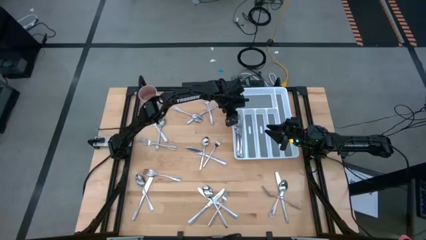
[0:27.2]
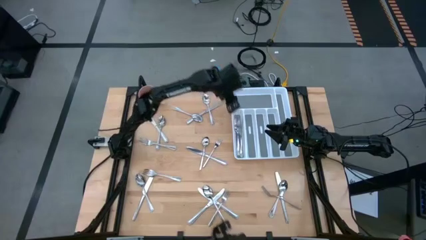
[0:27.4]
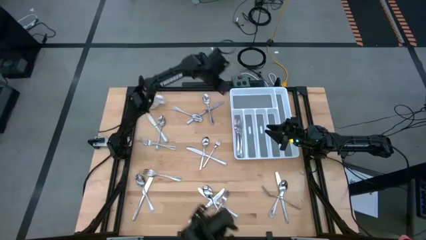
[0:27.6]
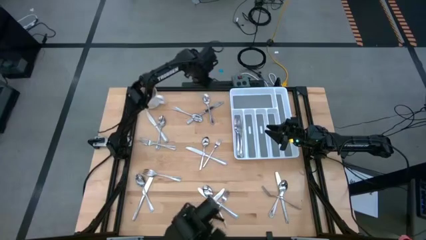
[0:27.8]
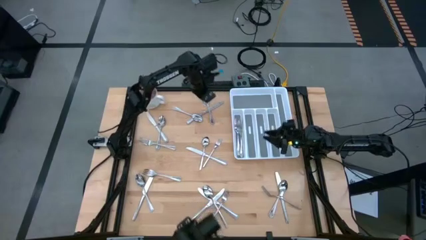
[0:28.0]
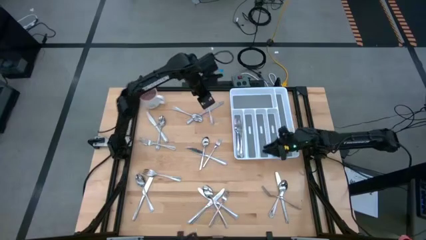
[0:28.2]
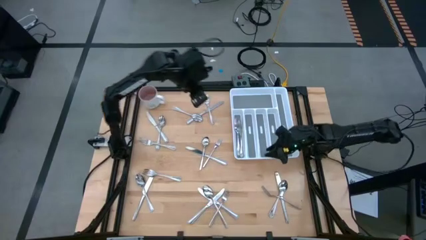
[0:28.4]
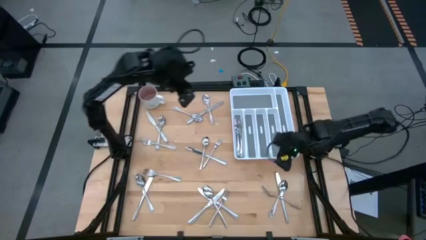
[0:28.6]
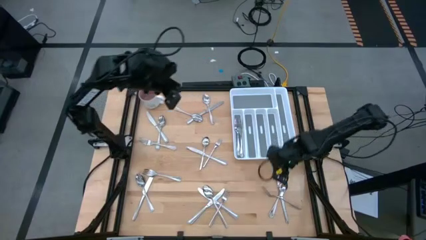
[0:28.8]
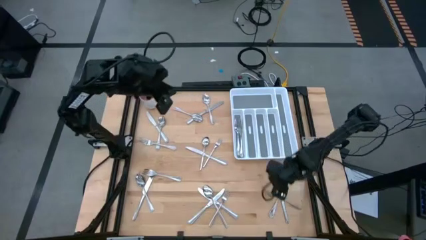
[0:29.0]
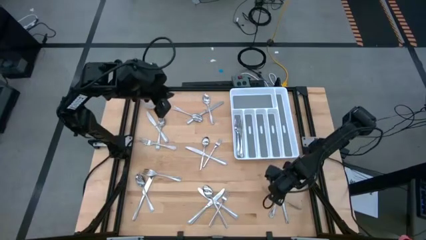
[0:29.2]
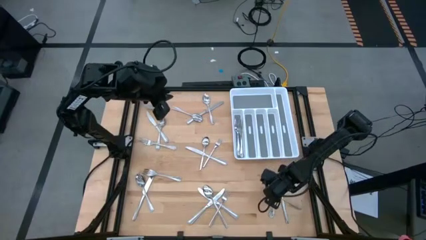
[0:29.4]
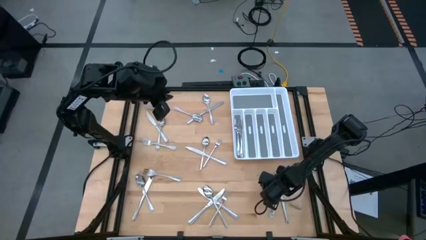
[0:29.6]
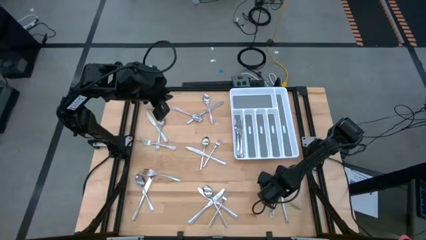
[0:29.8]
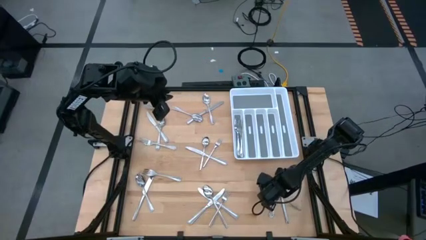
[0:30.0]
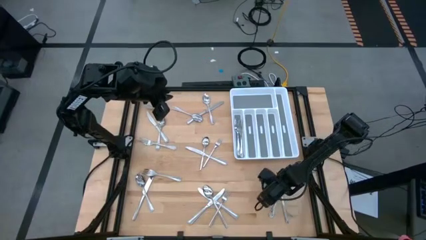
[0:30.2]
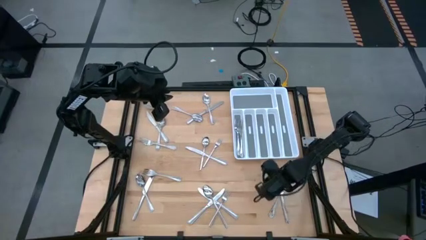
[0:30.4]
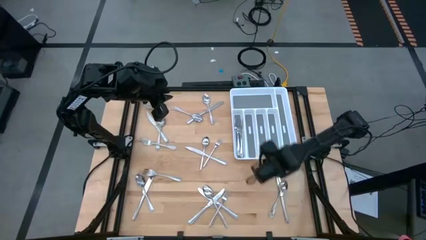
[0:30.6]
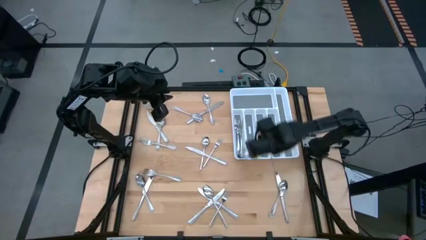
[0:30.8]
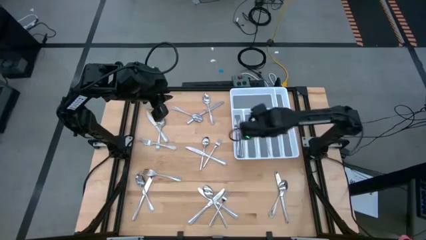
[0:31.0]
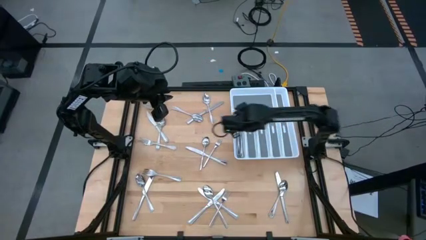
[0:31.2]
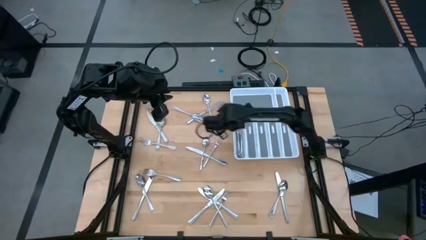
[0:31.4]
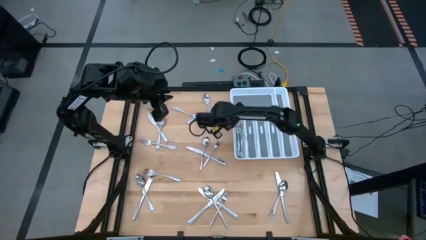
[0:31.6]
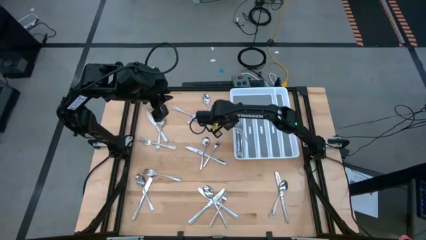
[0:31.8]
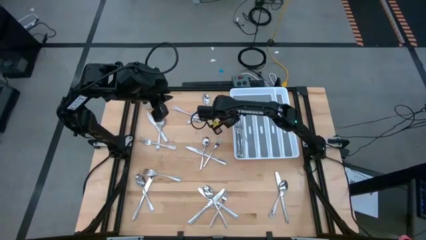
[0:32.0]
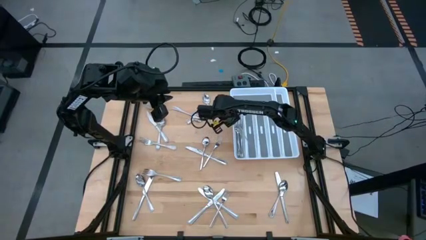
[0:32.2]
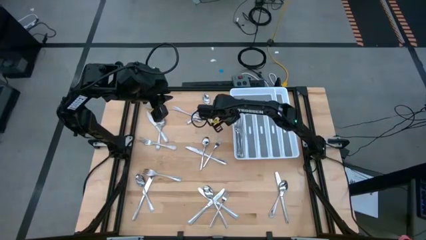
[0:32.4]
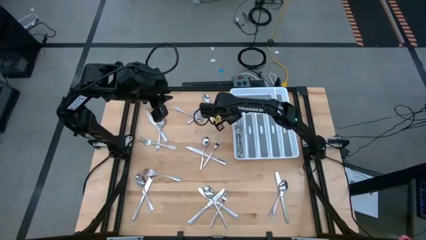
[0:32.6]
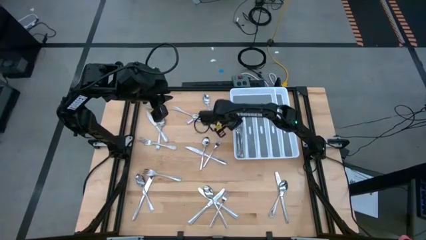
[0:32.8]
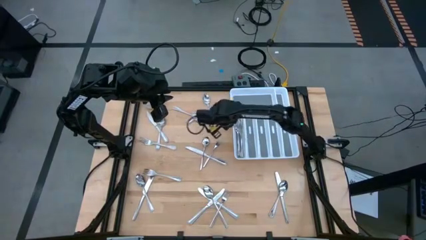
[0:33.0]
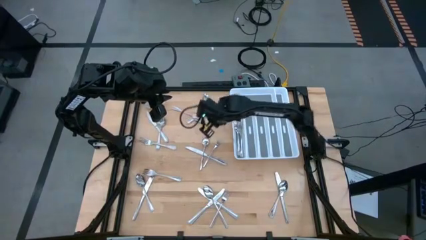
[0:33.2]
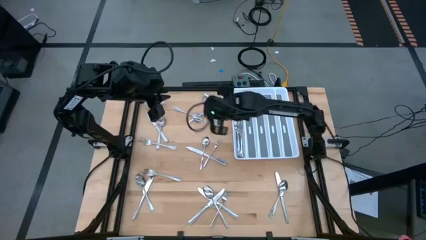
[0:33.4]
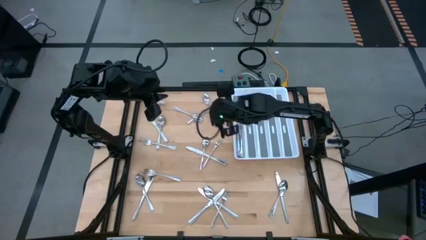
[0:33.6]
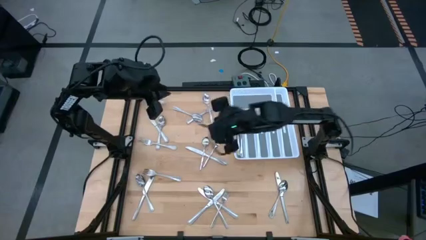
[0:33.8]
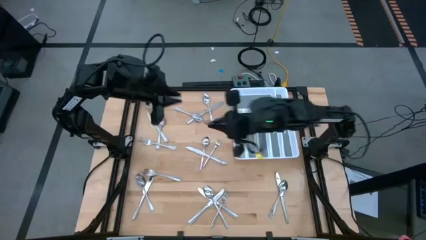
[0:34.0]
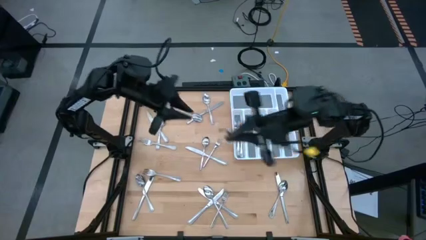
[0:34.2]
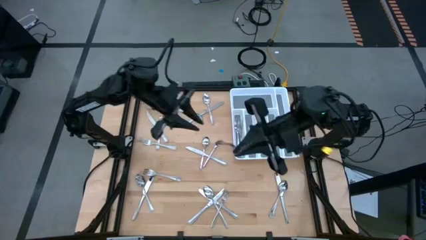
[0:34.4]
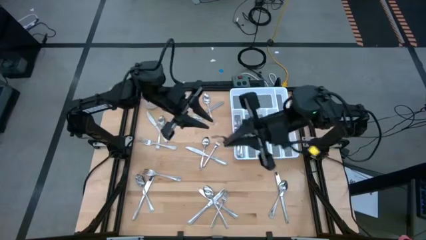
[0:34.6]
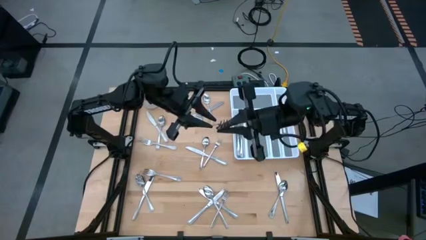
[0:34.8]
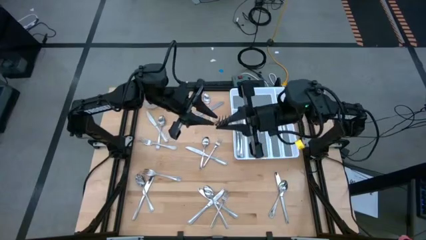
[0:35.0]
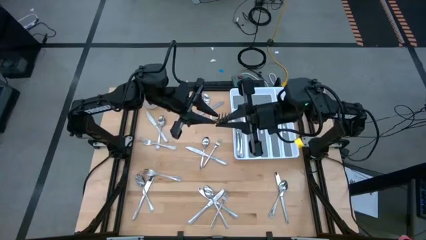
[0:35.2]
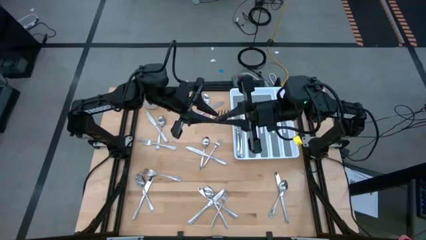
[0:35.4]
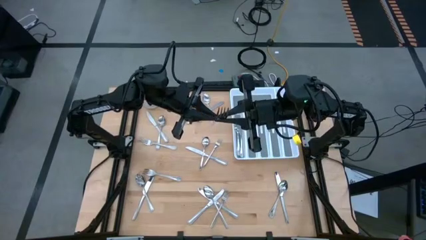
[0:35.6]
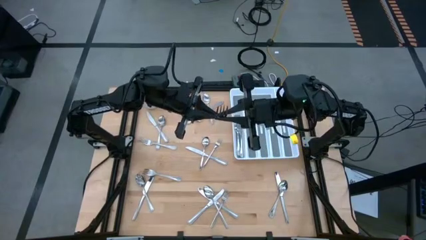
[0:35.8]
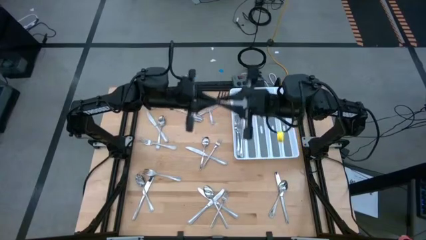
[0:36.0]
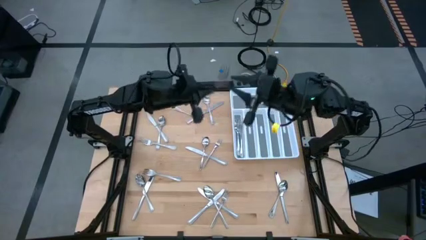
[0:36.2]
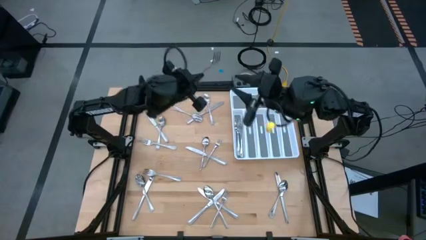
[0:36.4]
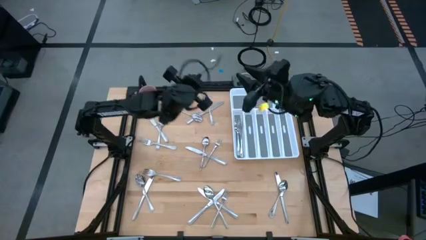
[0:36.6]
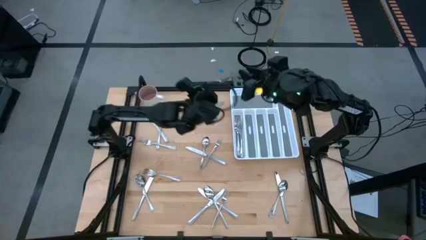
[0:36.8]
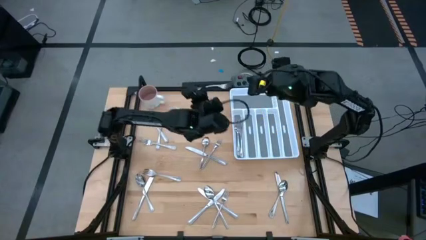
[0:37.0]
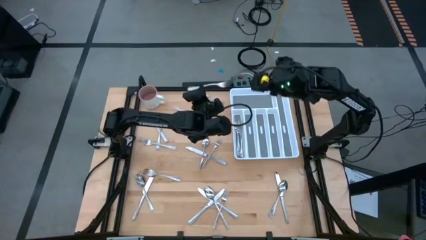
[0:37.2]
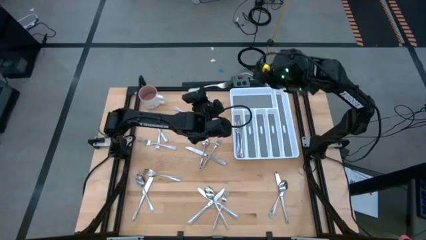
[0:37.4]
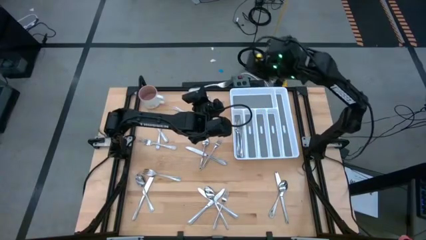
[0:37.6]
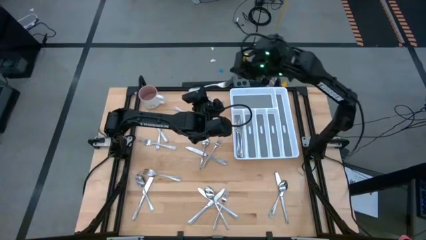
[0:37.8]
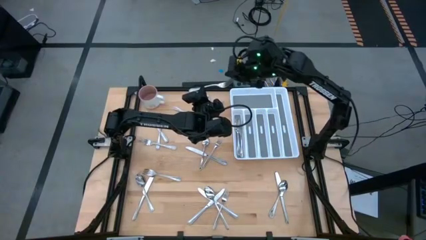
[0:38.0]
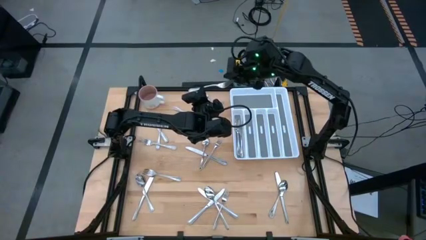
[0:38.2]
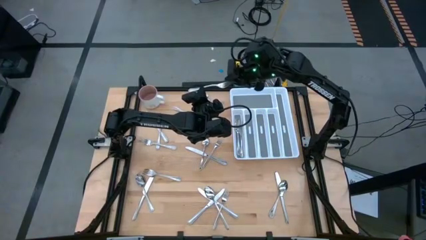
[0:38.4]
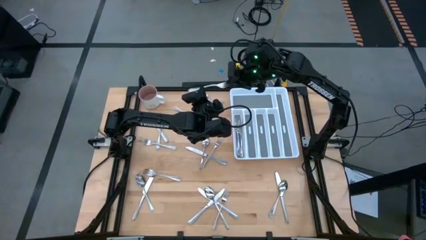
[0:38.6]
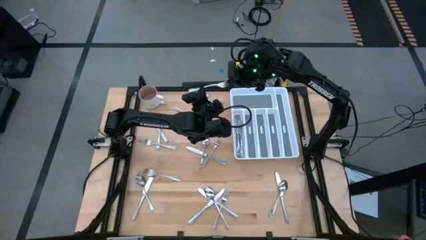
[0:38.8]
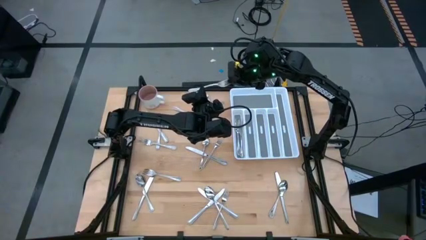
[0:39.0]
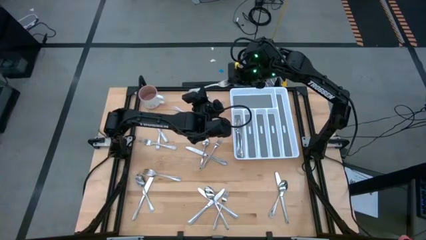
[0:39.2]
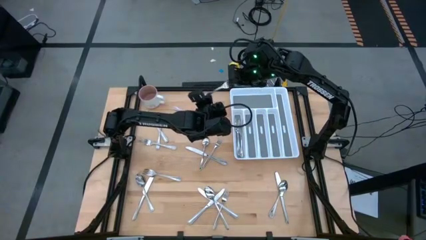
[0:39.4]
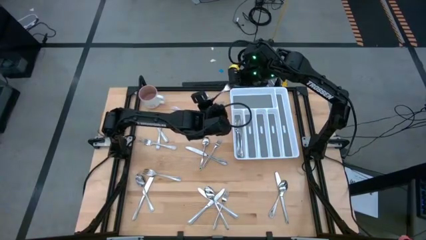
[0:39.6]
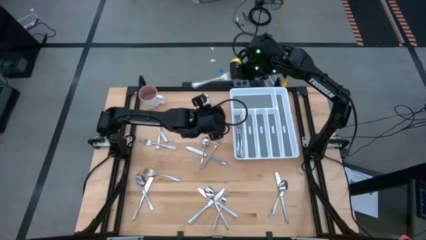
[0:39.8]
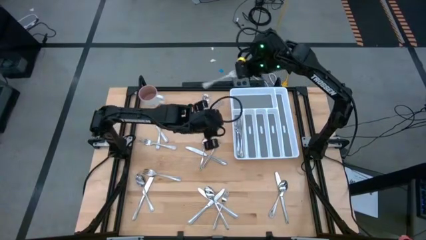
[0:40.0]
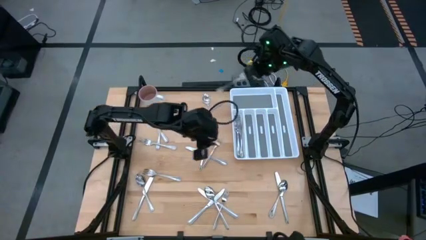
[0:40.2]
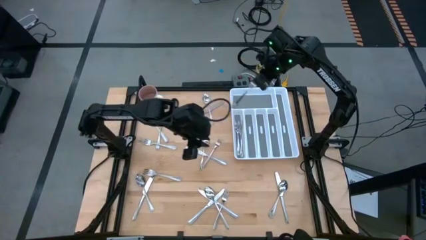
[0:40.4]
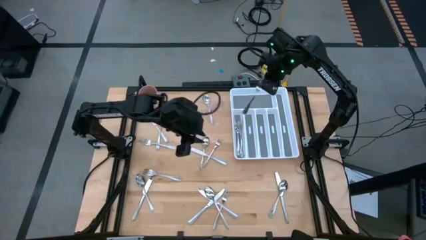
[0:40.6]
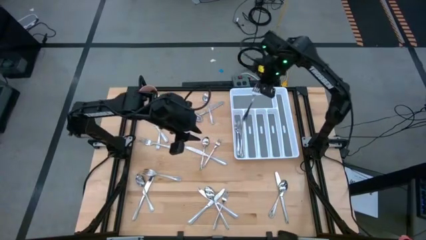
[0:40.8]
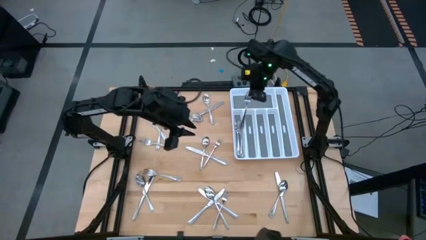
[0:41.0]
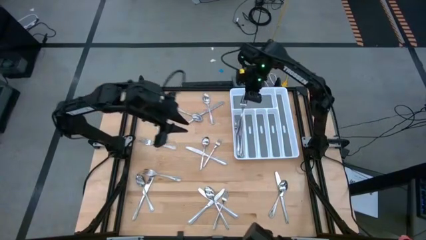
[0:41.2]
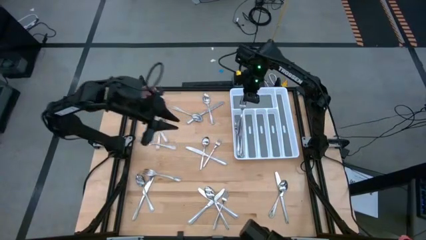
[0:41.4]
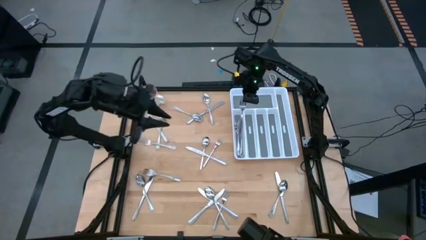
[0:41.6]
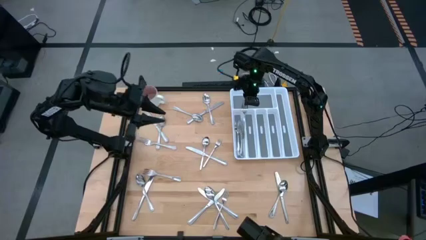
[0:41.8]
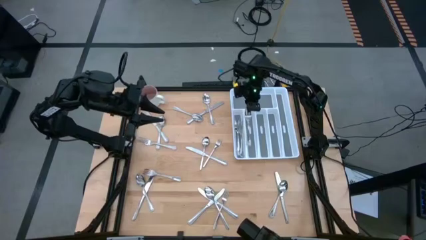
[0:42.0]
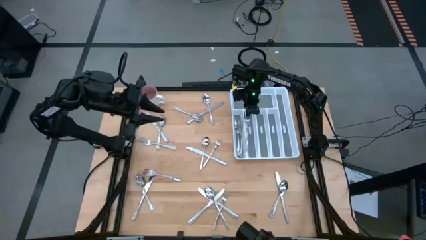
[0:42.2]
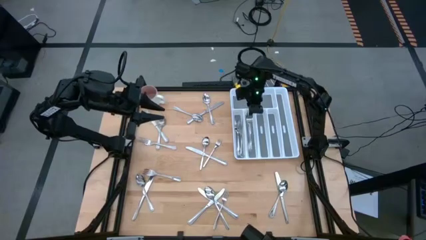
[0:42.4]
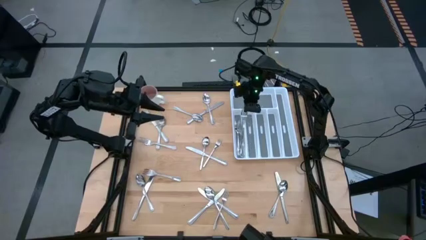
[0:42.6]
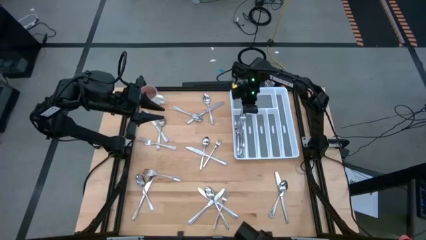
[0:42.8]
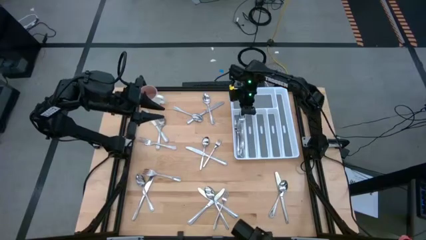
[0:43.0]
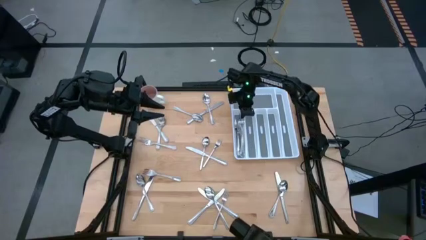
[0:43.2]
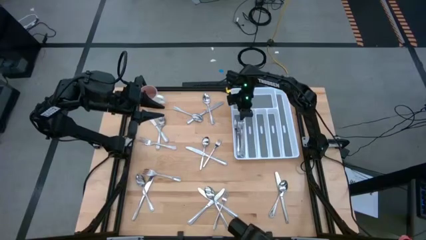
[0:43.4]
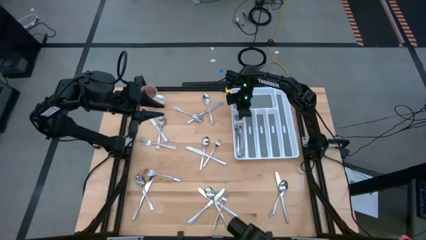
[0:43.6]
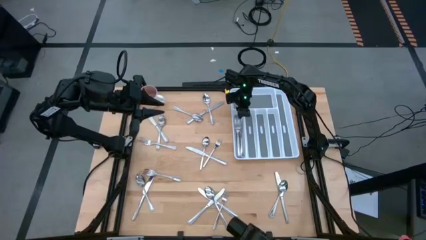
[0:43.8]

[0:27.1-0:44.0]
Task: Sort silverware
Put the silver fork into the silverware tray
